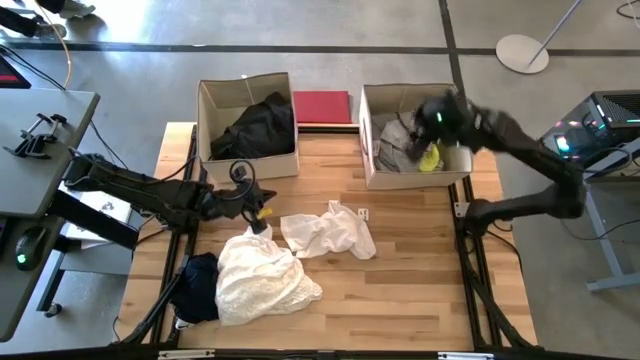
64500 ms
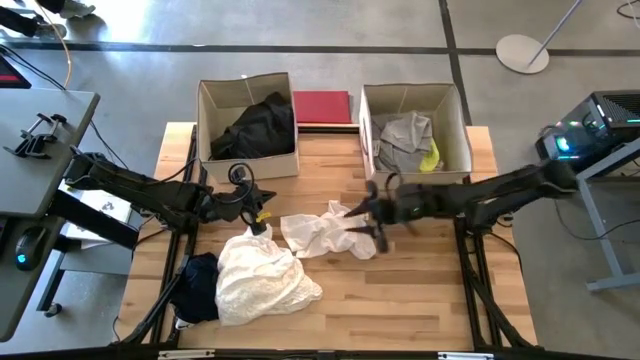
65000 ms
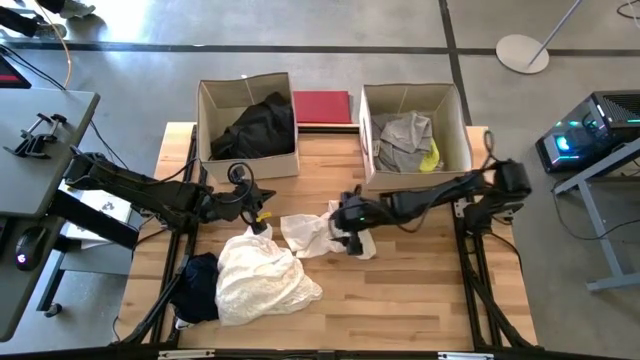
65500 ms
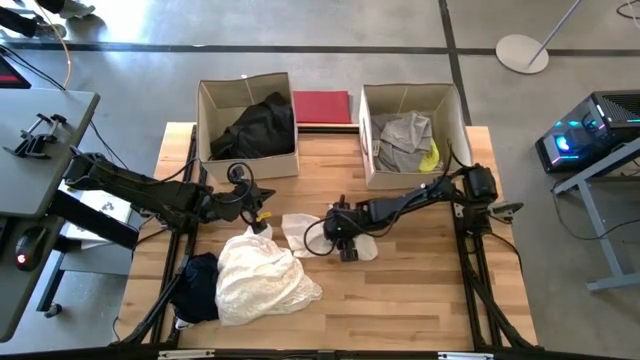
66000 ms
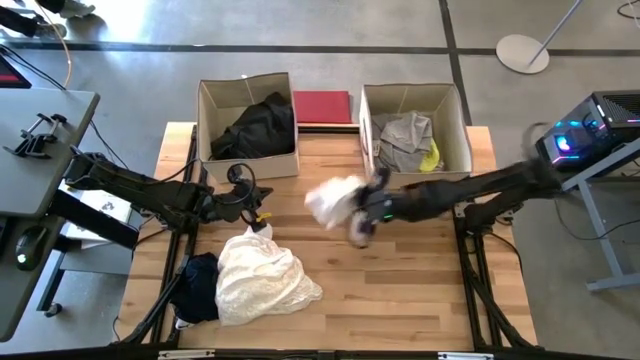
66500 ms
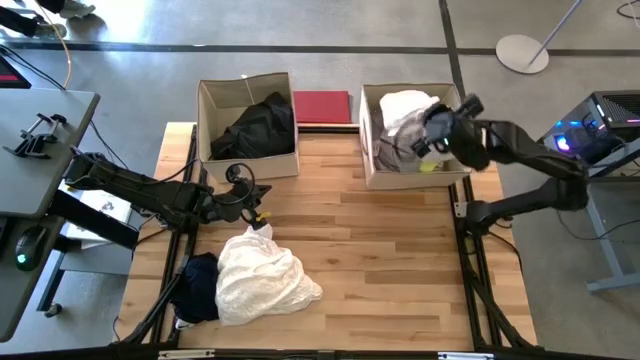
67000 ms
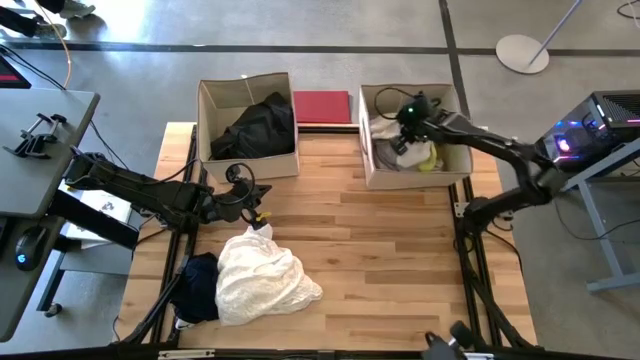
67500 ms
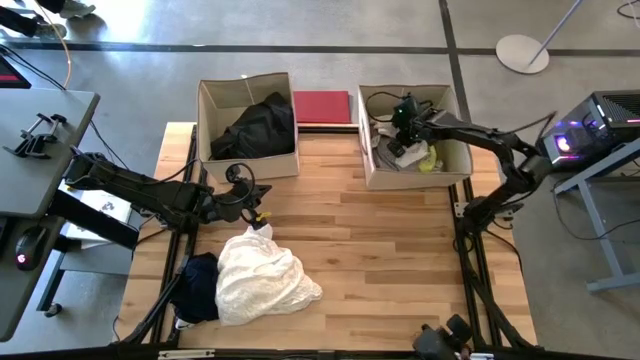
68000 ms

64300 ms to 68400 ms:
Task: Sort clothes
Put the white towel into the right laundry organizer

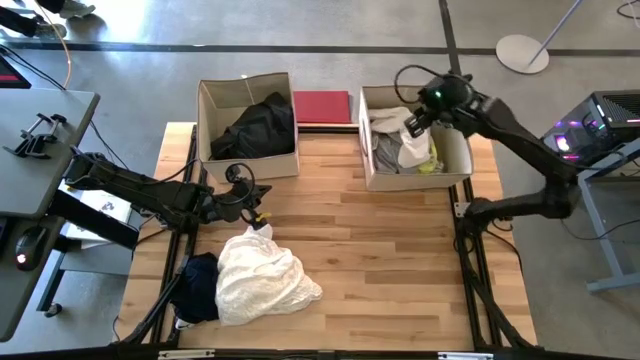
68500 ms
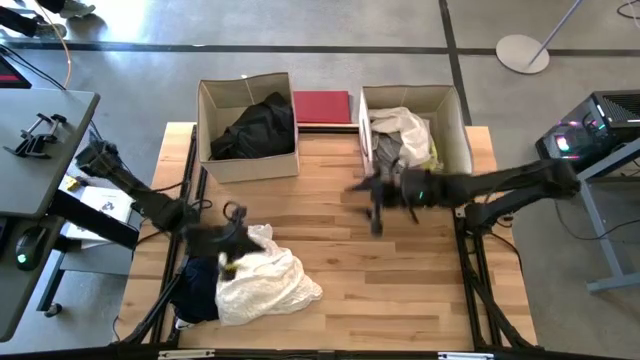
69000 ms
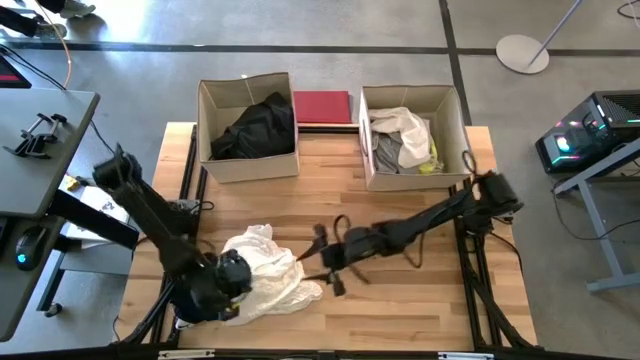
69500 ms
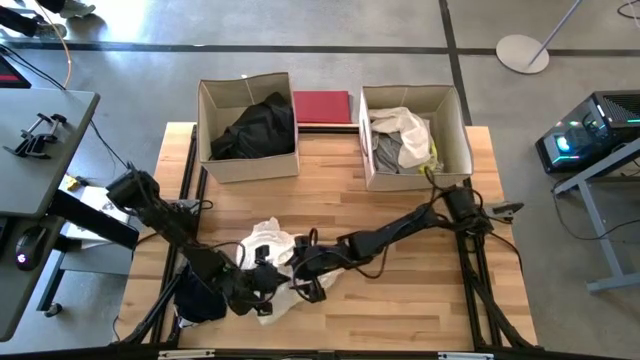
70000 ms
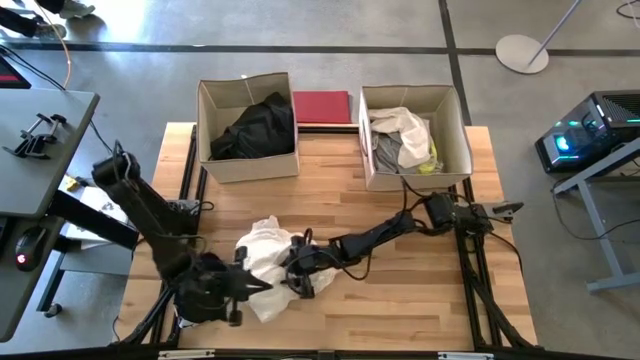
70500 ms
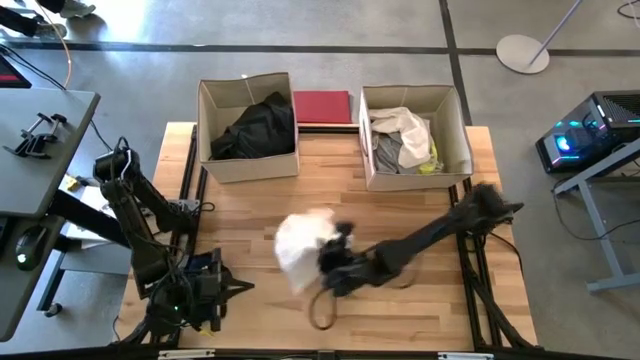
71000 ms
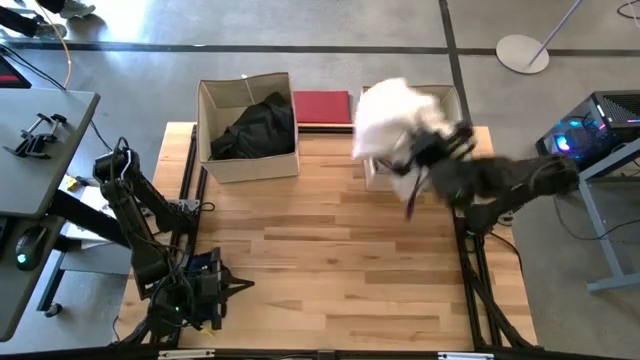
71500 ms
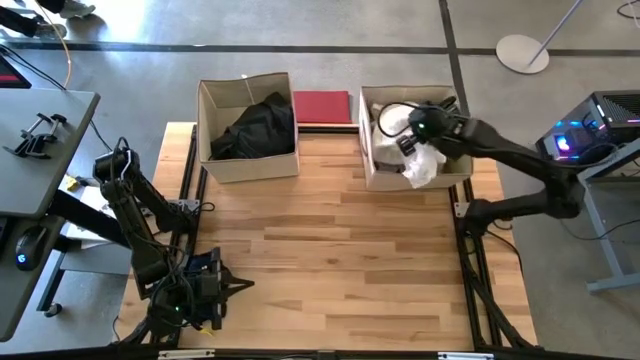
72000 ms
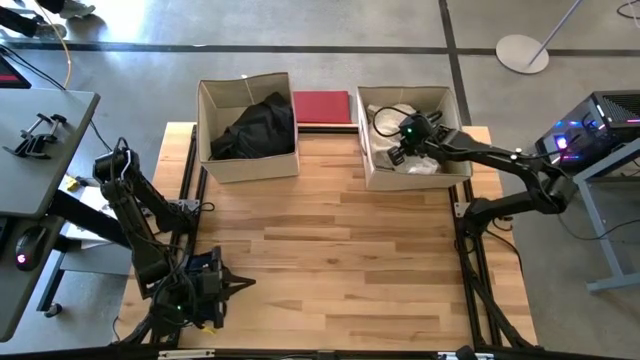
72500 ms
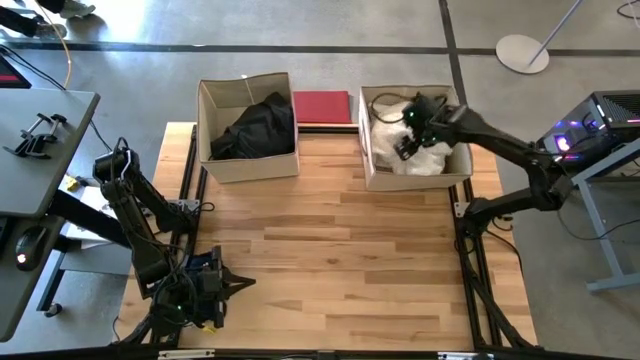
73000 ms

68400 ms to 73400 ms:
Put the white cloth into the right laundry organizer

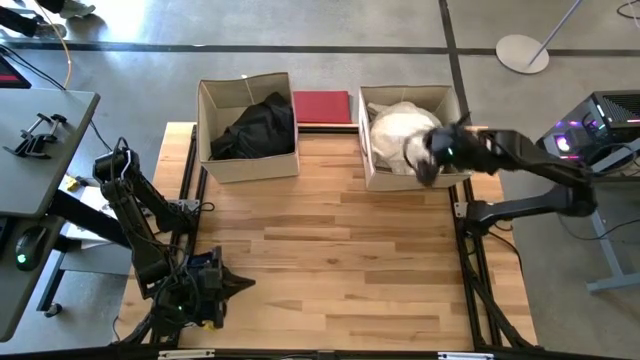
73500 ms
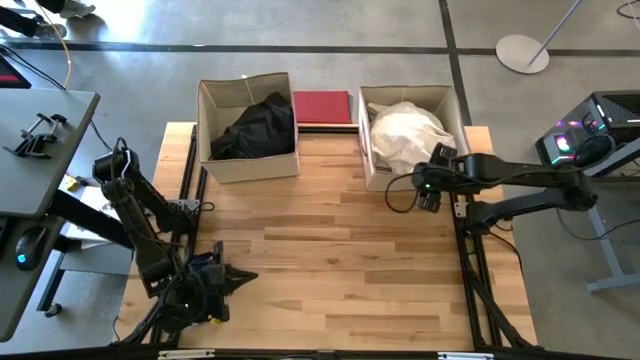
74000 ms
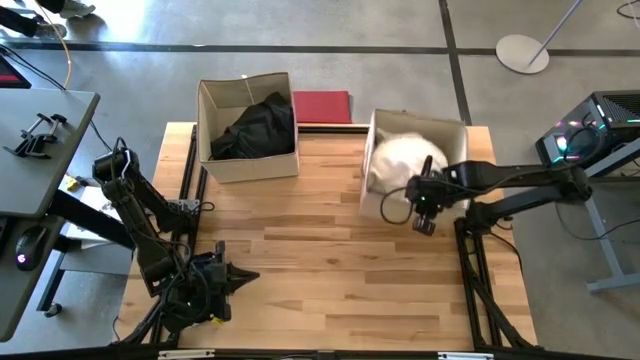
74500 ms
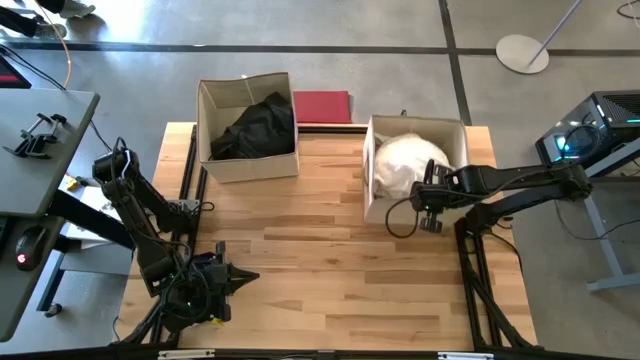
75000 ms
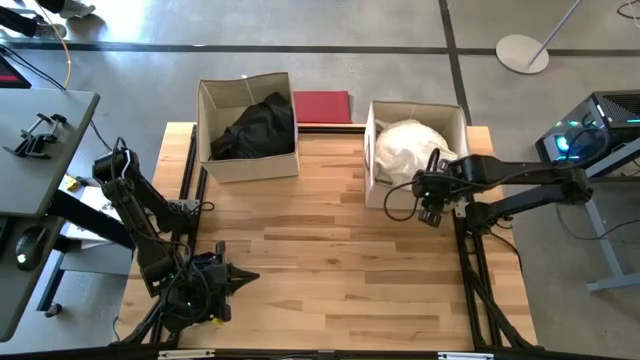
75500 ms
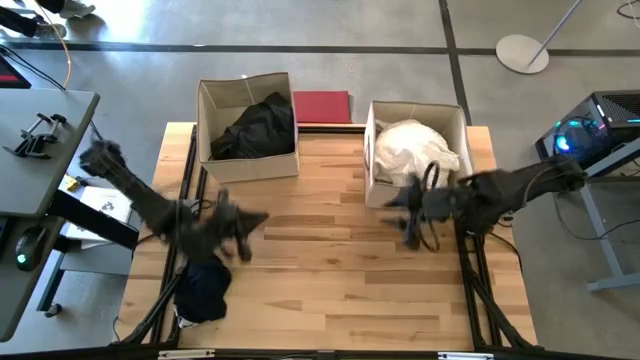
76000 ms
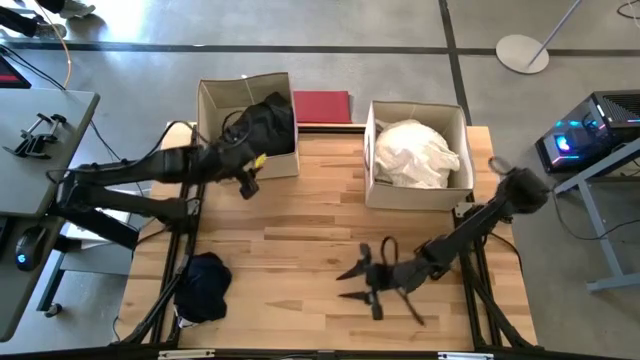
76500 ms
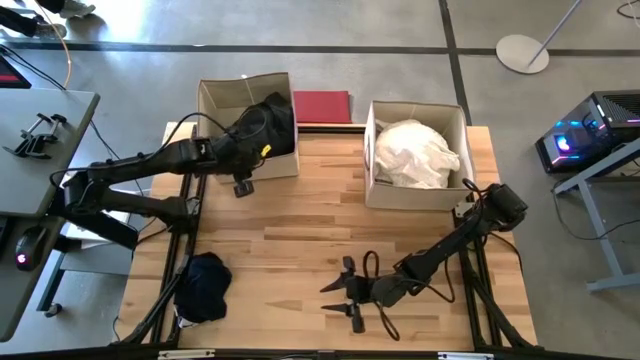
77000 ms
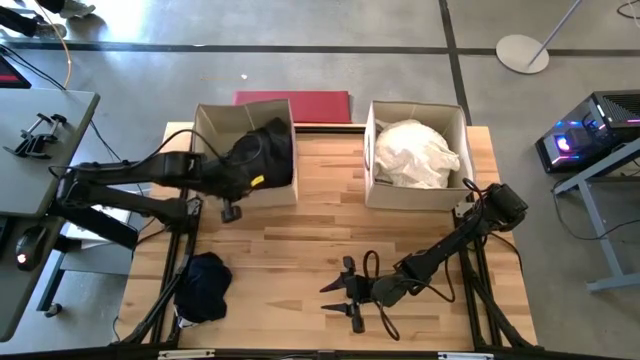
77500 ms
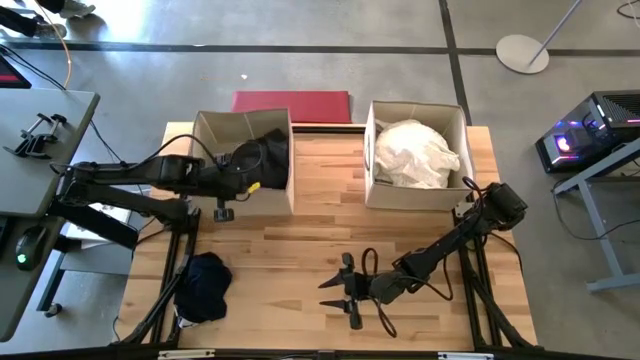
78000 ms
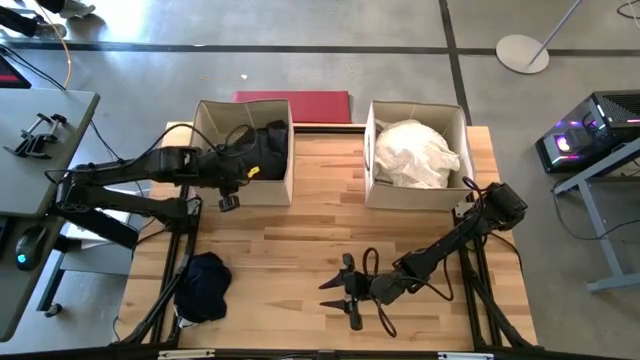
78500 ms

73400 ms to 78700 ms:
Adjust the laundry organizers

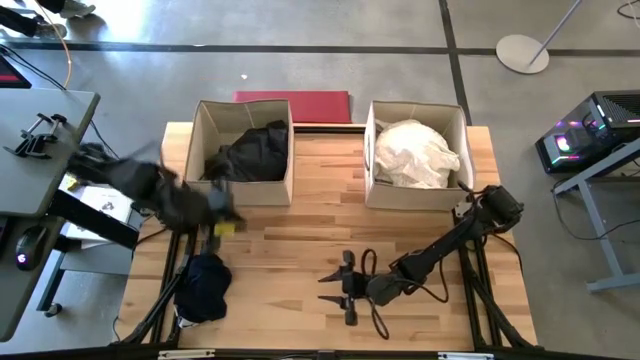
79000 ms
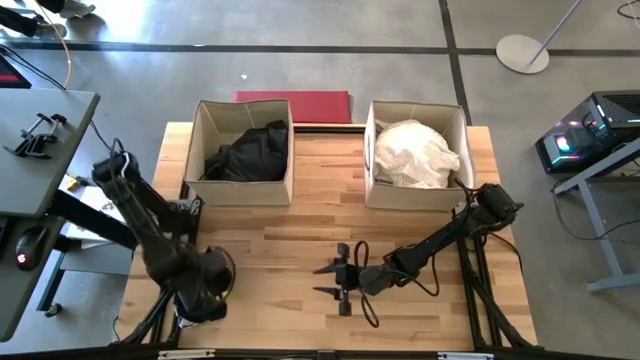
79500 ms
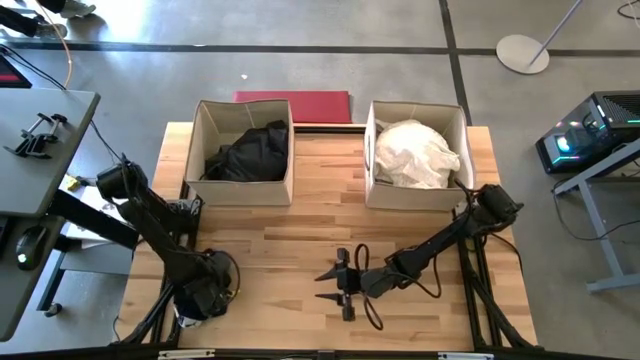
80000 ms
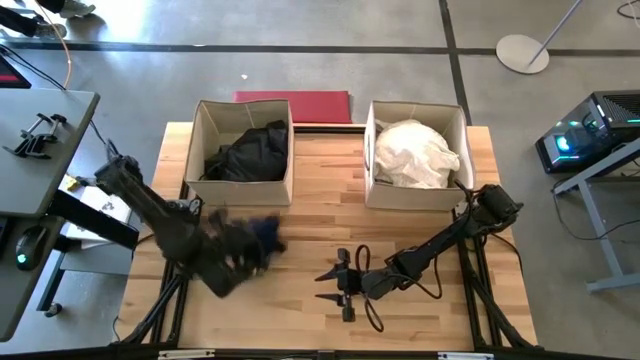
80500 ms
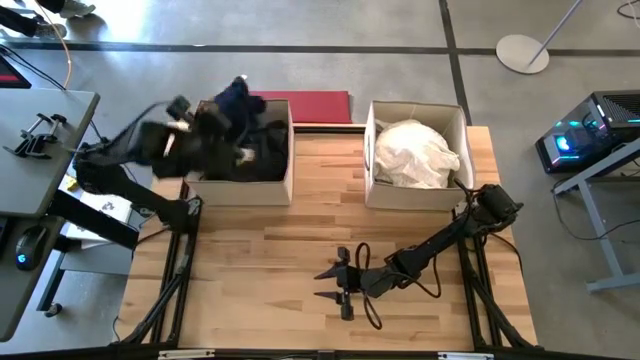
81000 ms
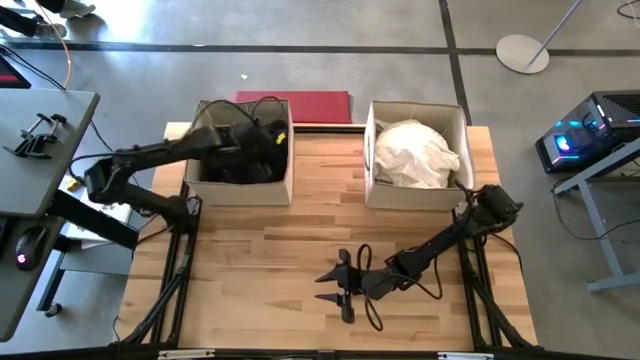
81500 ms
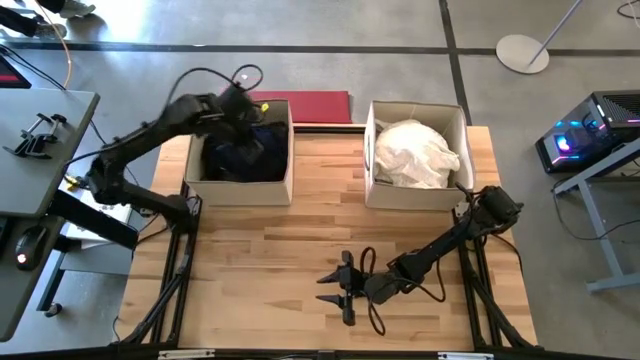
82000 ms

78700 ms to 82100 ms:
Put the blue cloth into the left laundry organizer

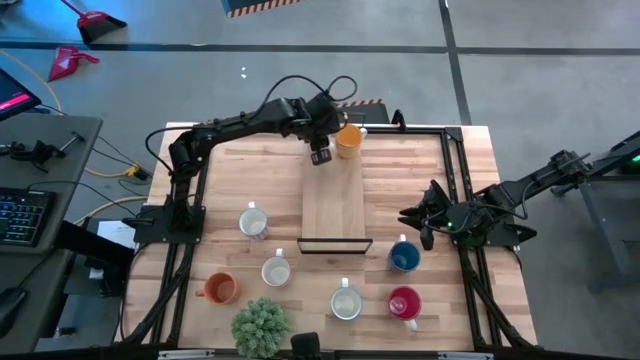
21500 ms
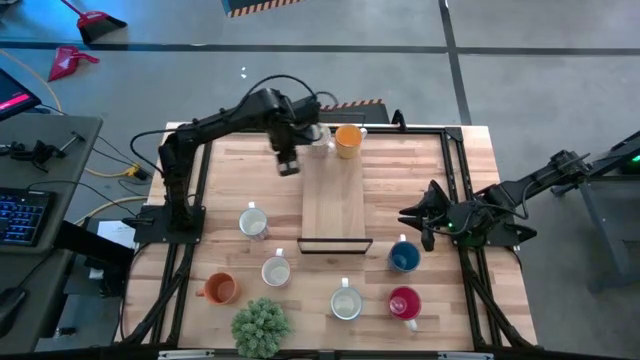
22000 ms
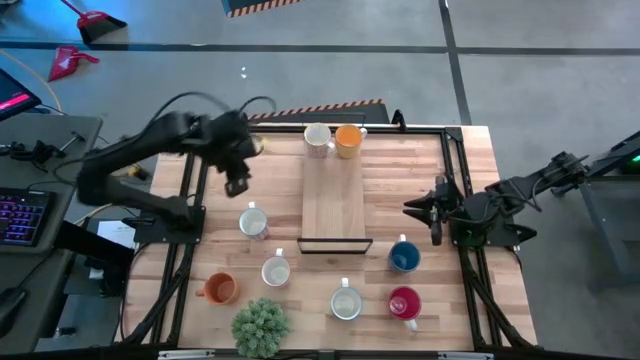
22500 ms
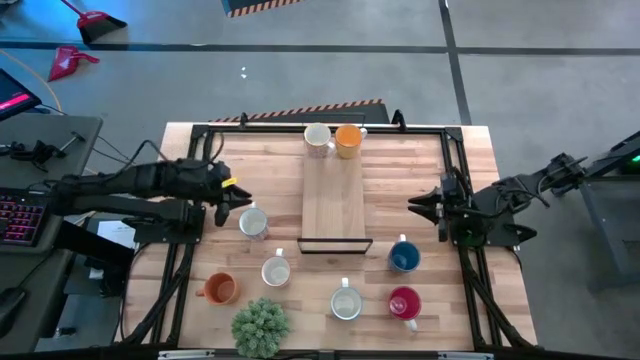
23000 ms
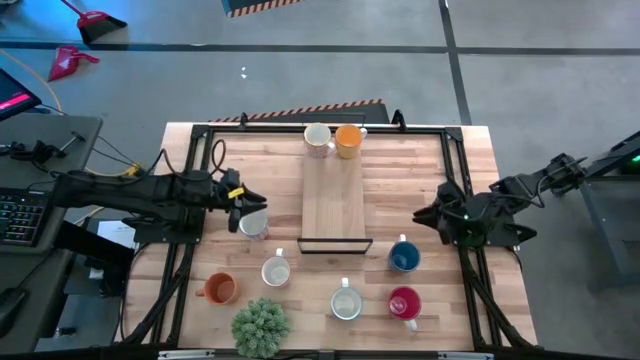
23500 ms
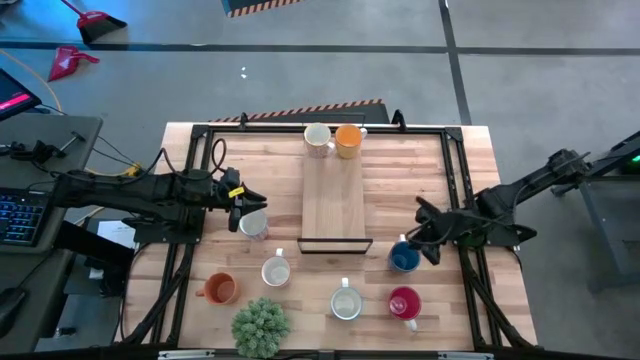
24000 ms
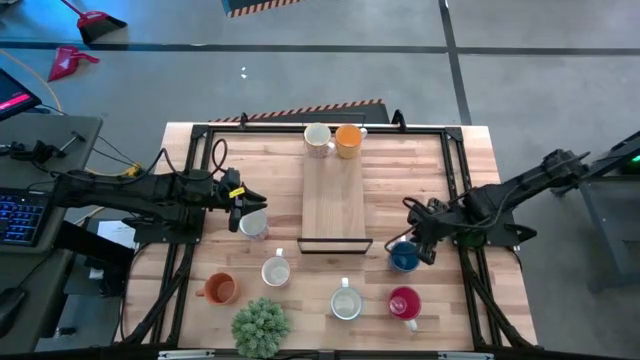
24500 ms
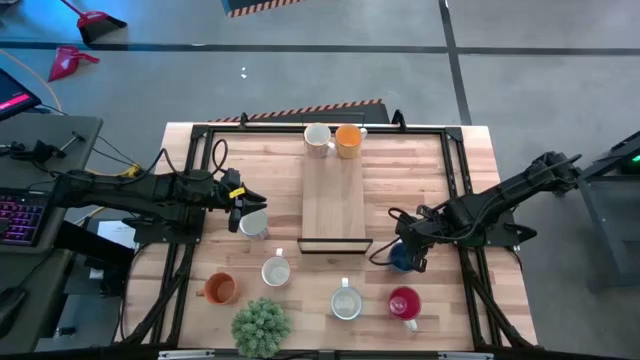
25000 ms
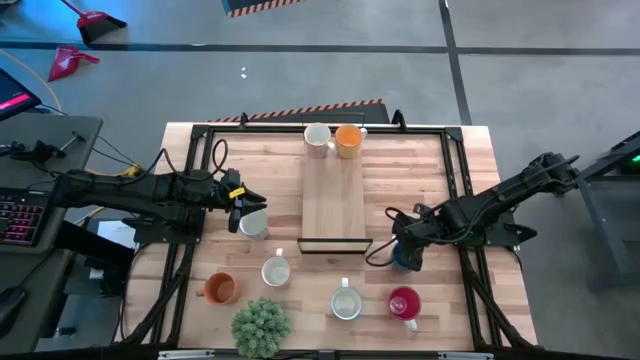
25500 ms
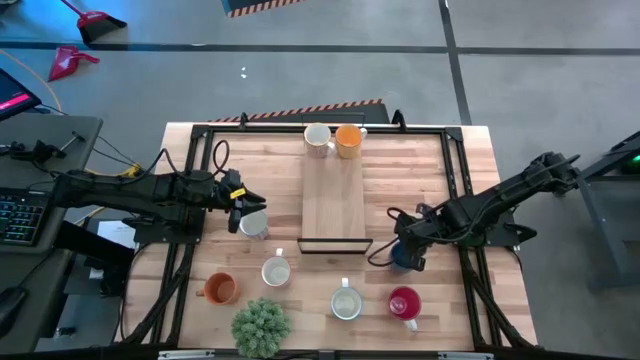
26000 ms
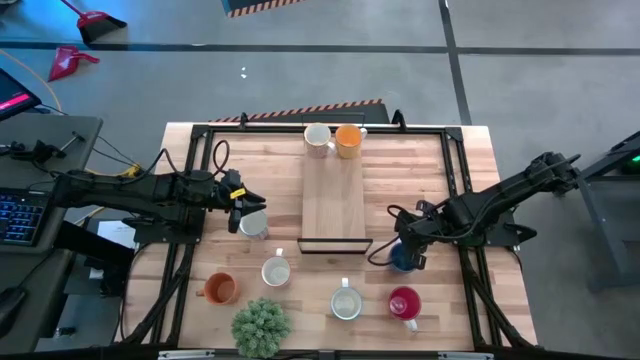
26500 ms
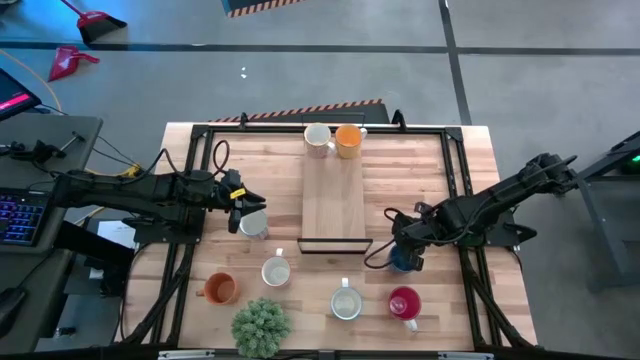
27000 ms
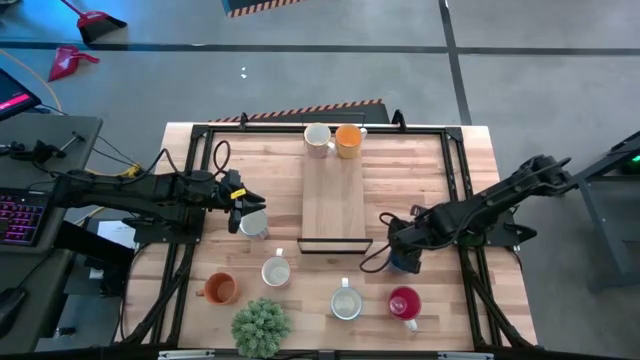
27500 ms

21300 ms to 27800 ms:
Task: Place coffee mugs
Put the blue cup on the shelf
